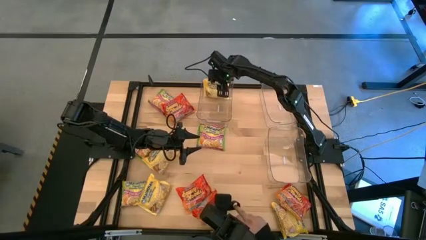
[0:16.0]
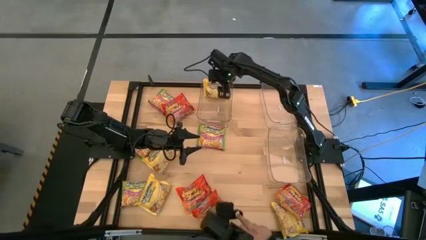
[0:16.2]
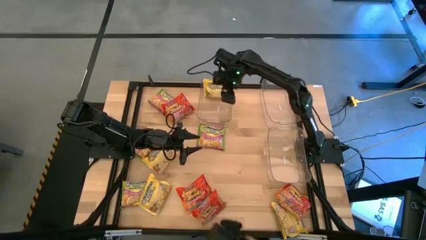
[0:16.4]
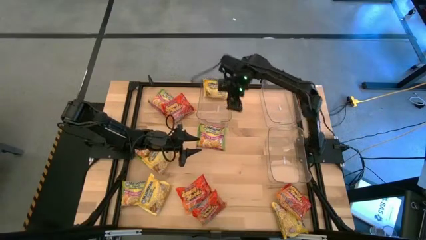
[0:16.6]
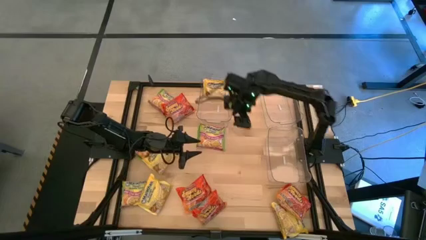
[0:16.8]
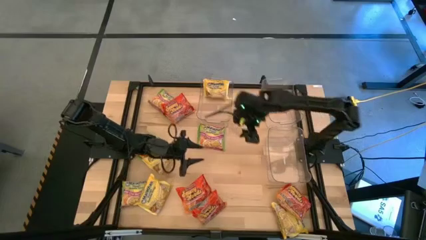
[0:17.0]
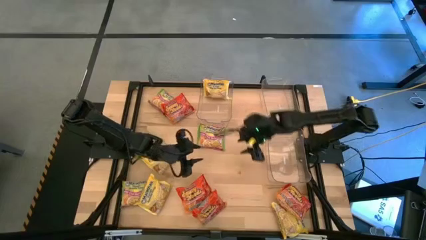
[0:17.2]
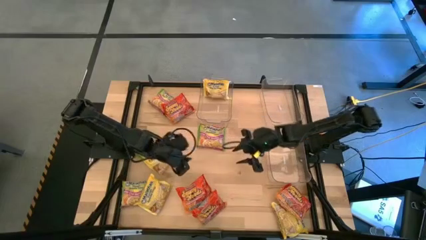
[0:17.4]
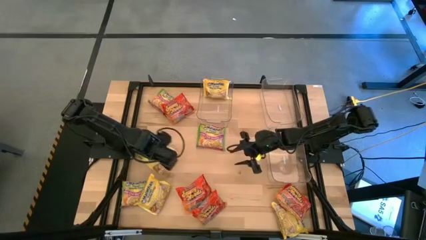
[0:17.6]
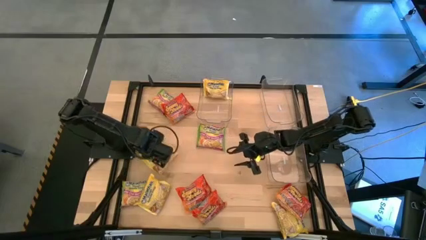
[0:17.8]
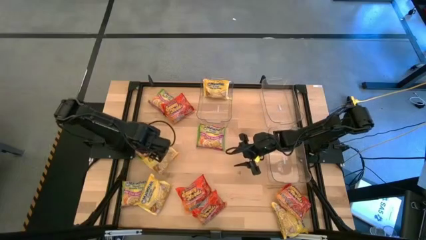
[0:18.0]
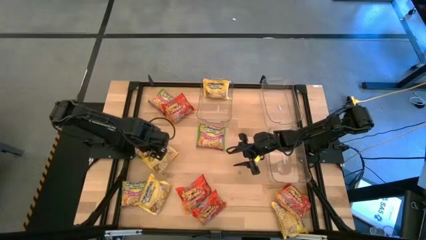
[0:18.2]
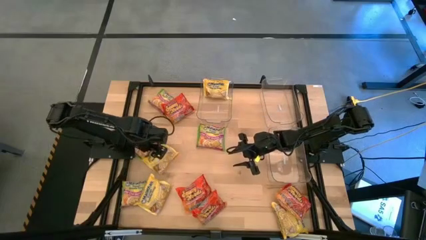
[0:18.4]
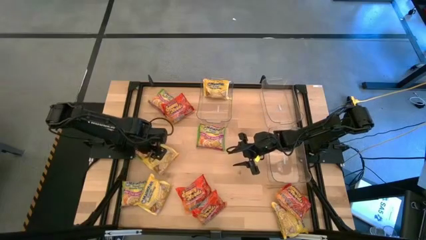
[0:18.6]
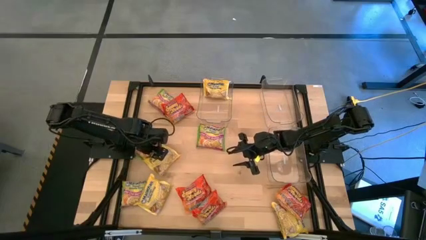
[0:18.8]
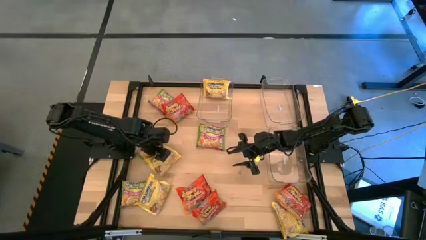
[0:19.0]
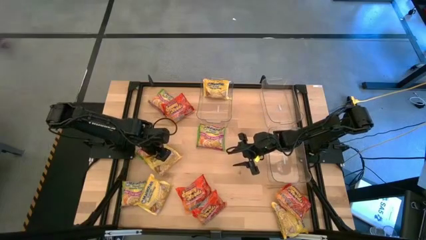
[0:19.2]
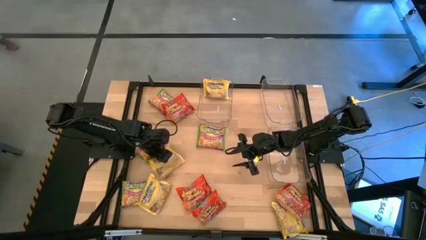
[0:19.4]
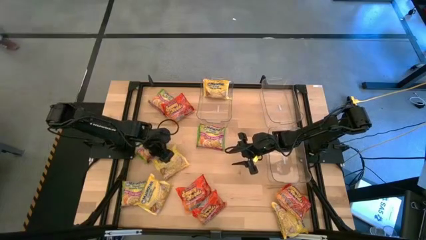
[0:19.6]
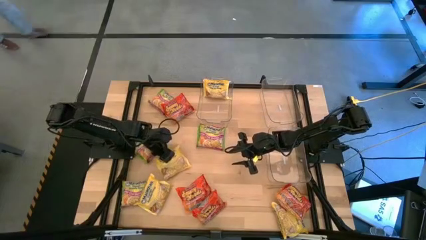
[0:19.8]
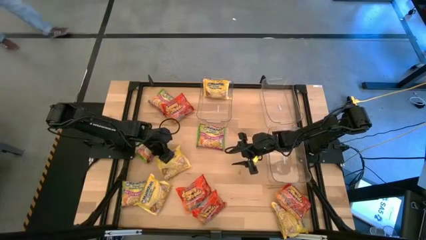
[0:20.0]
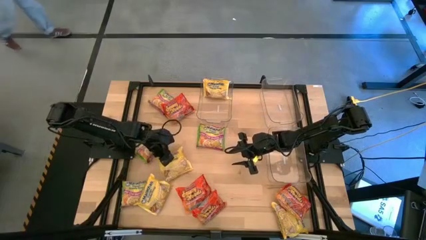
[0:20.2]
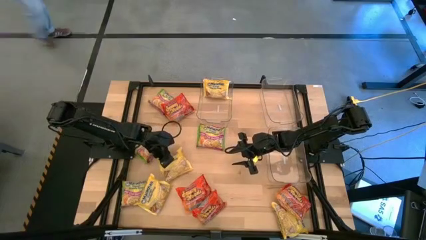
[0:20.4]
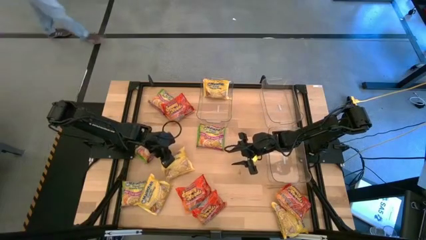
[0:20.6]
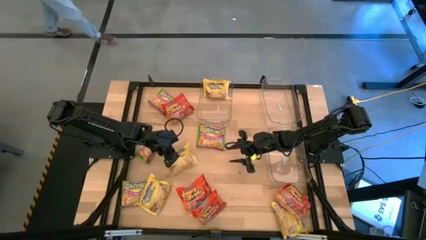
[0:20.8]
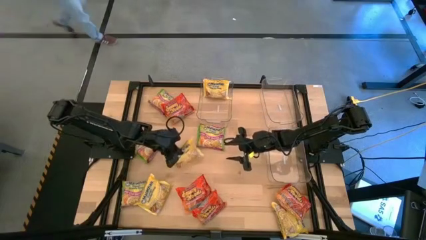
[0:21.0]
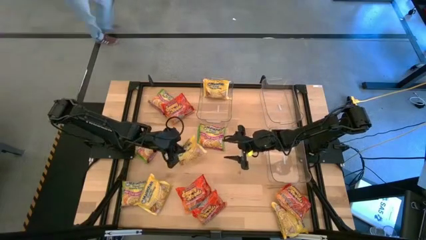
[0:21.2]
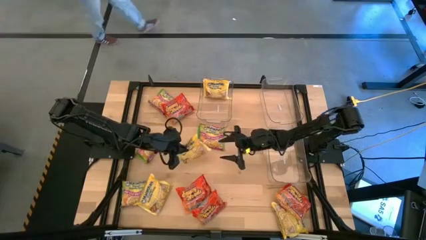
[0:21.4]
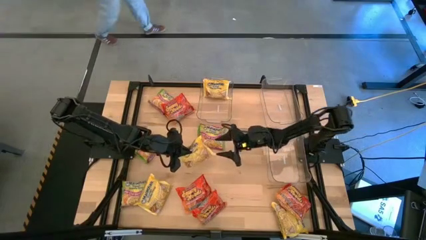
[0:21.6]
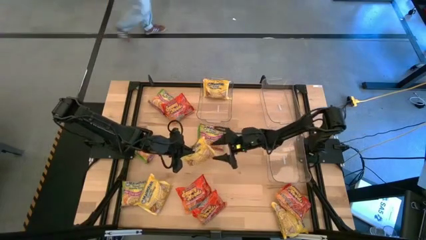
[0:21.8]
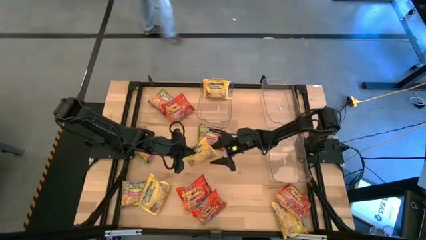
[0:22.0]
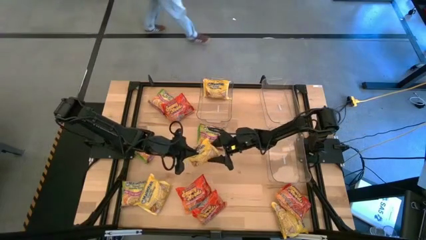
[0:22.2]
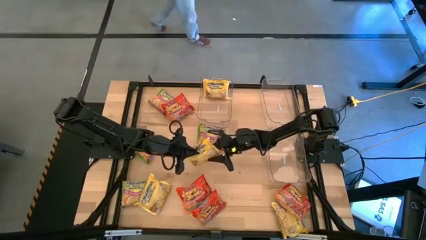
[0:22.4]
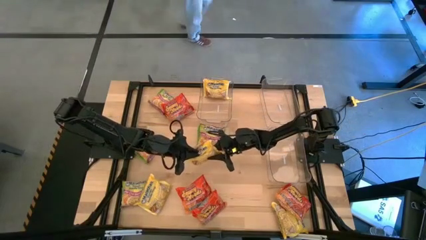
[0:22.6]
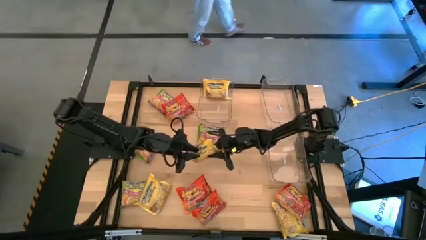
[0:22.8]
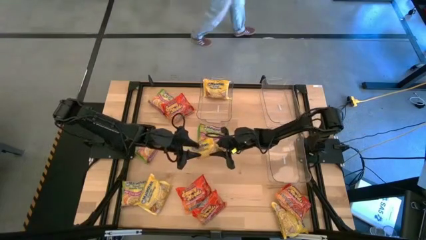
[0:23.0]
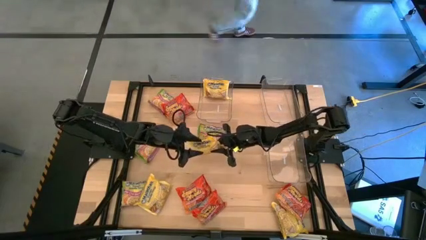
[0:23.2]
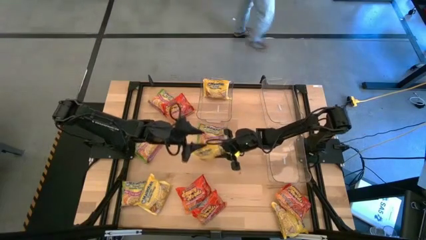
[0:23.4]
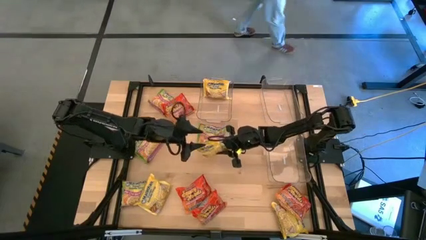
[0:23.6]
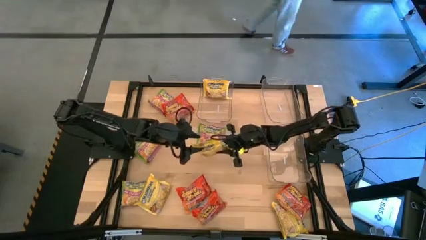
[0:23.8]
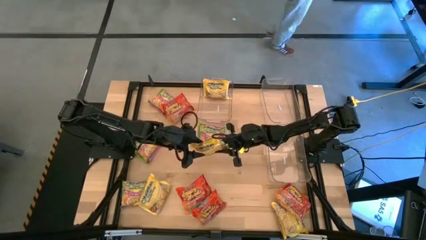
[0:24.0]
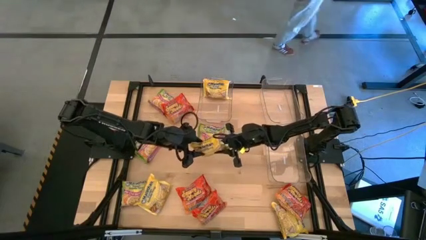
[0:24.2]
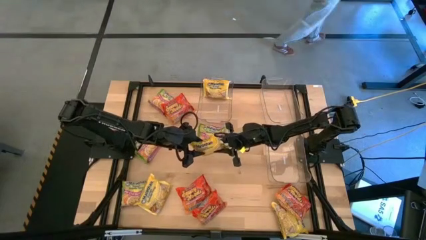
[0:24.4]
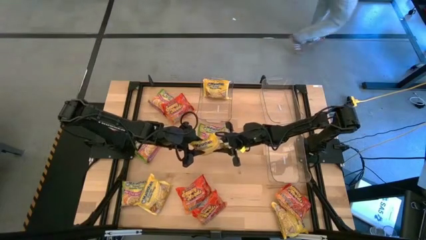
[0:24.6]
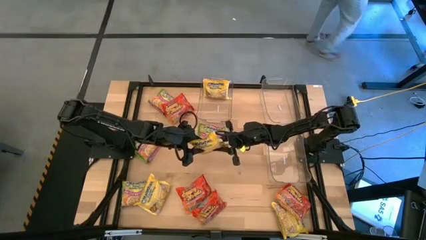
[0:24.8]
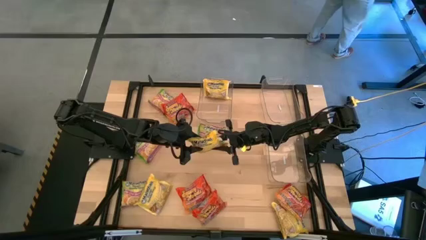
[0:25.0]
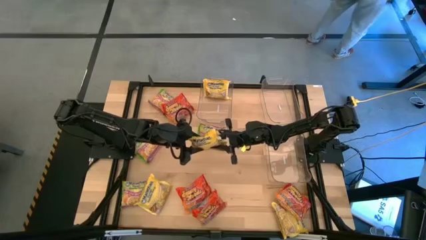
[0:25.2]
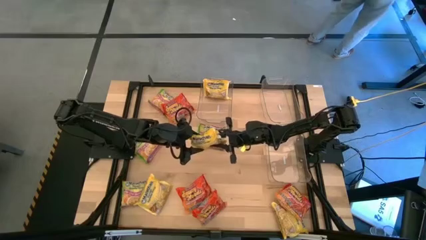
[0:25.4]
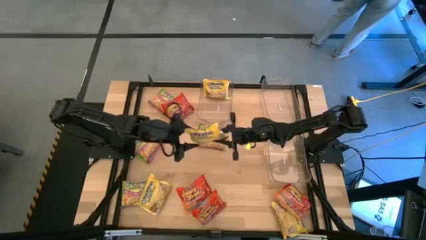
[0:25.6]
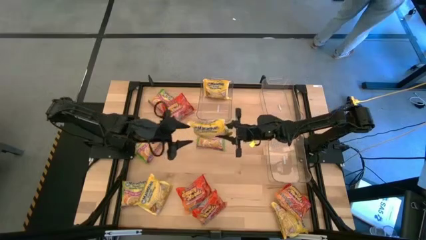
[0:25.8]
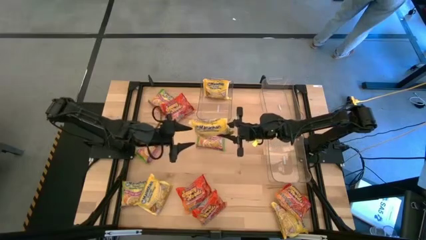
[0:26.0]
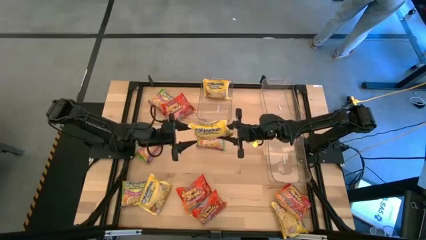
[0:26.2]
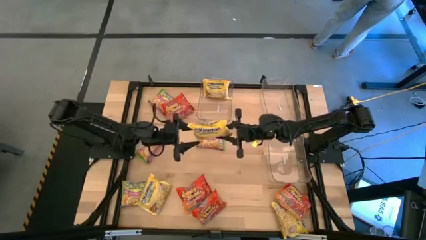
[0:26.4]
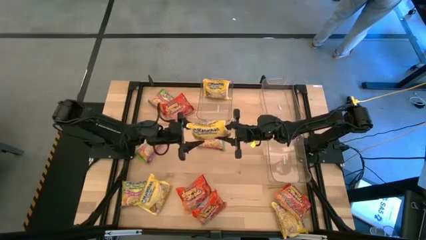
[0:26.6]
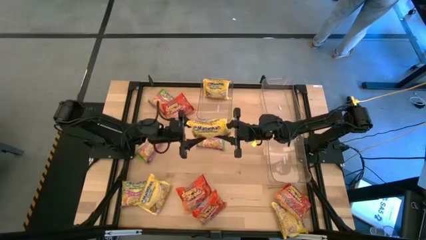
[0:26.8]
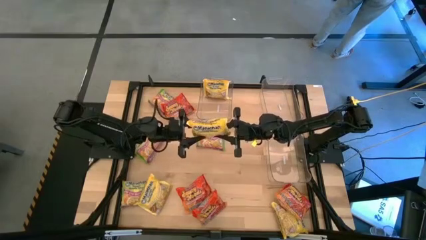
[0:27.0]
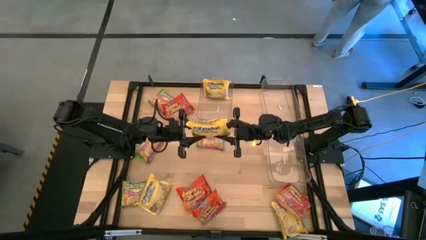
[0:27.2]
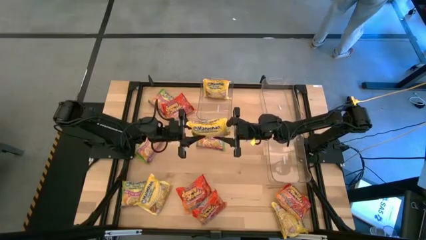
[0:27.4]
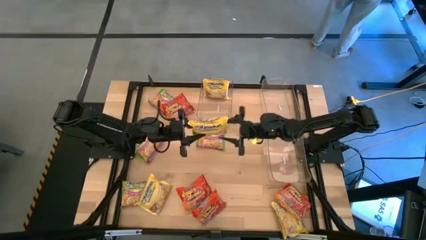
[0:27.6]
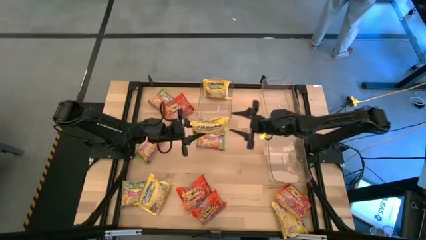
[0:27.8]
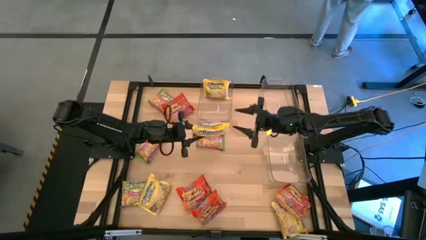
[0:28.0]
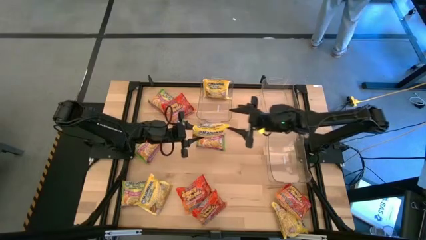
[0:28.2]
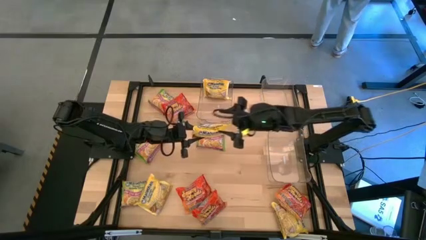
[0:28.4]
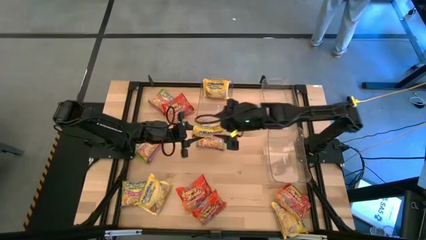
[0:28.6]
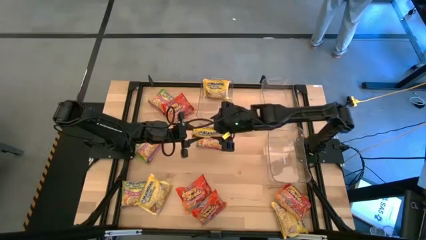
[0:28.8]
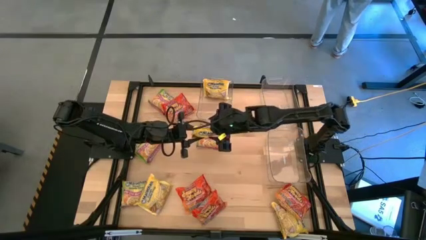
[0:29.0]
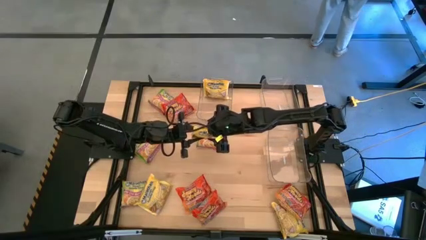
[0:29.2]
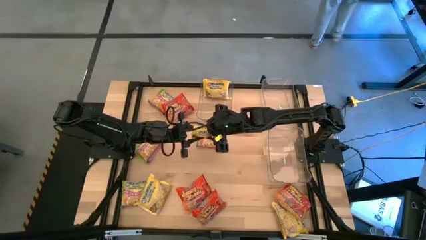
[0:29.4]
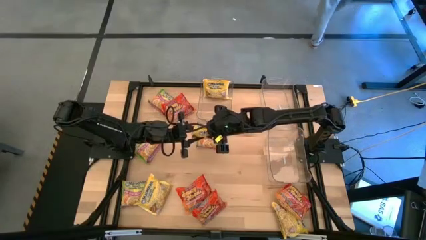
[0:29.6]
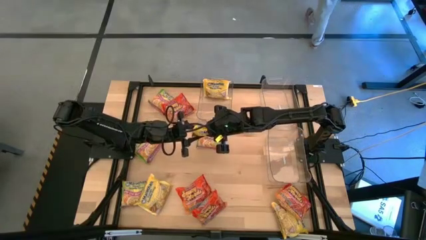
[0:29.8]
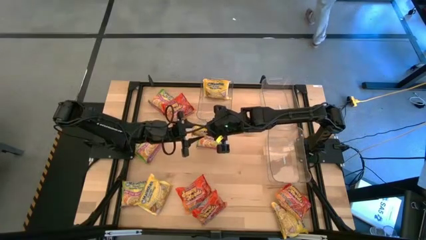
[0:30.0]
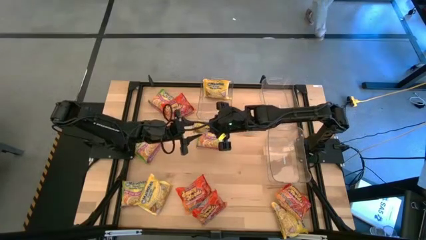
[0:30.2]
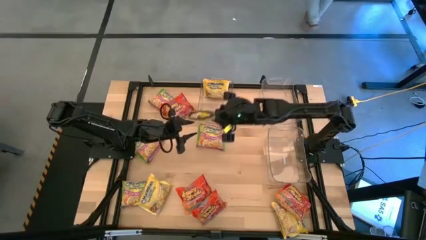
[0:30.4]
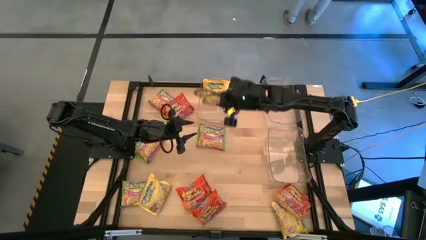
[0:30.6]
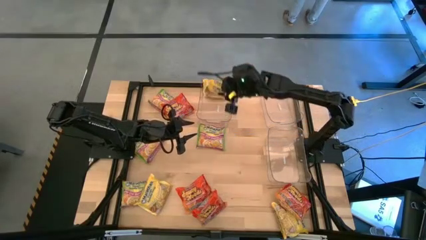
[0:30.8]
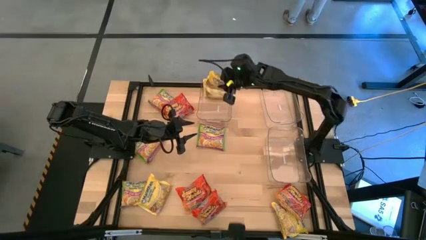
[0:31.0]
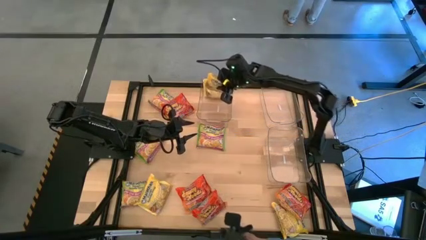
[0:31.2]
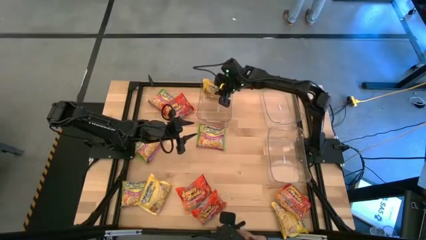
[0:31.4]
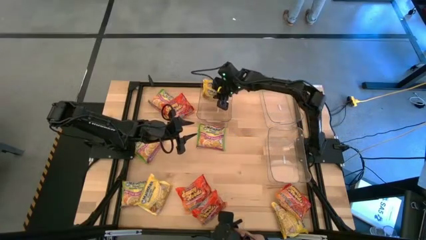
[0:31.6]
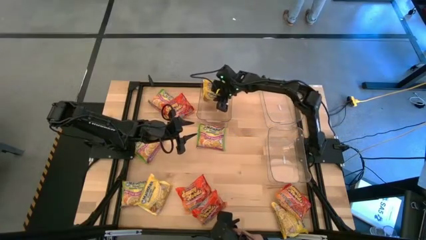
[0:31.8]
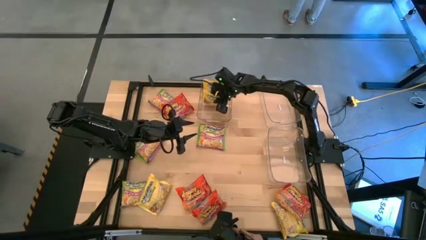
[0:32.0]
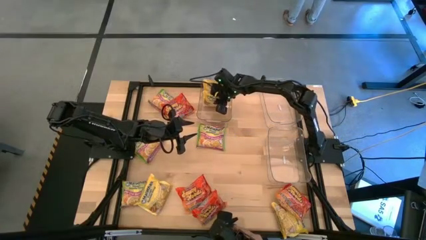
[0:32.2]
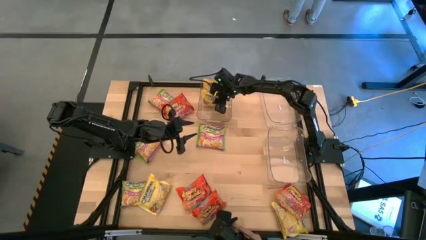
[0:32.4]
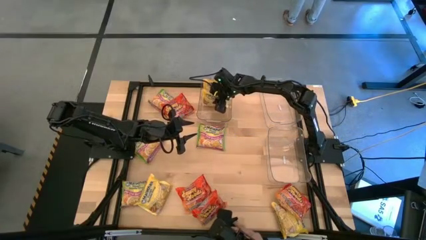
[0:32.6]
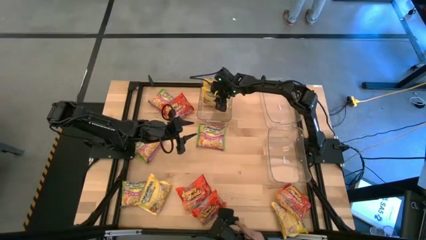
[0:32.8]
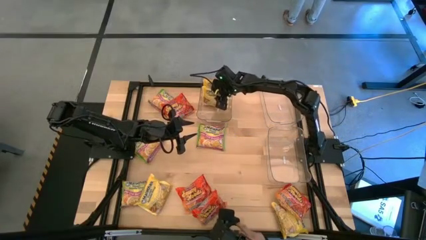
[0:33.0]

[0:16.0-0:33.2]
Task: Sort Maruchan noodles
Put the yellow noodle pack into the top left transparent bin
